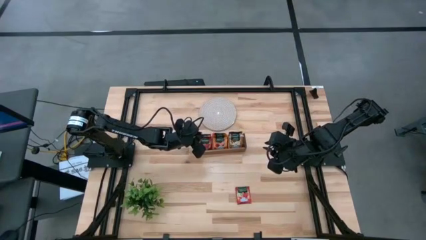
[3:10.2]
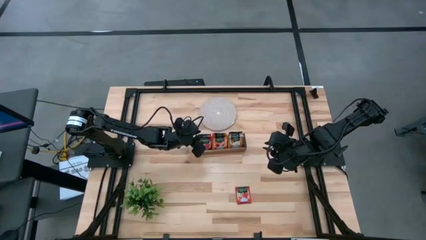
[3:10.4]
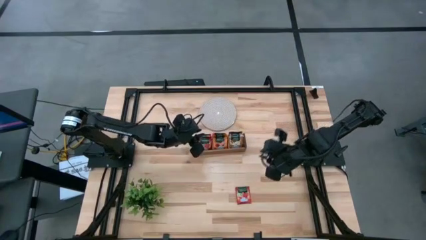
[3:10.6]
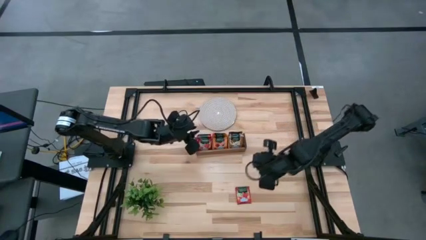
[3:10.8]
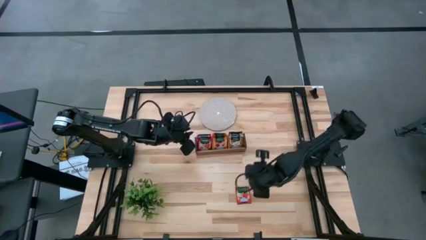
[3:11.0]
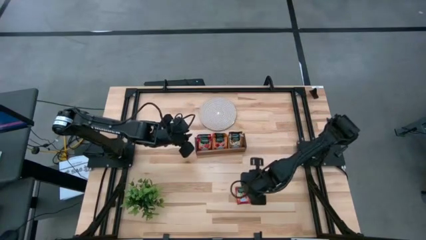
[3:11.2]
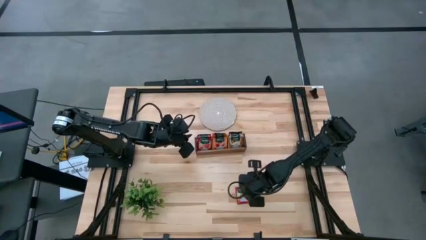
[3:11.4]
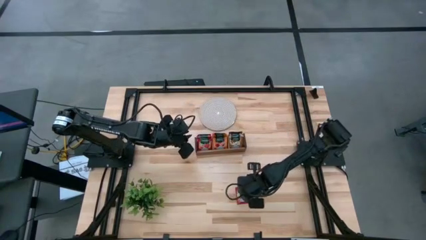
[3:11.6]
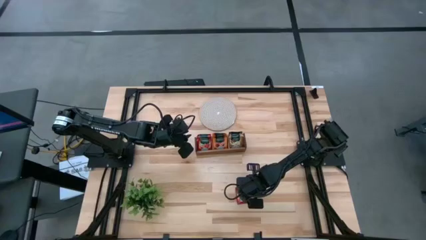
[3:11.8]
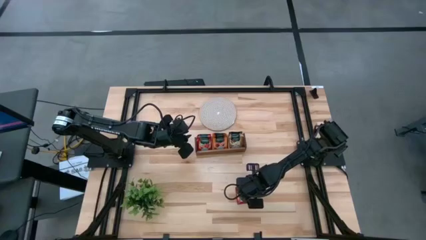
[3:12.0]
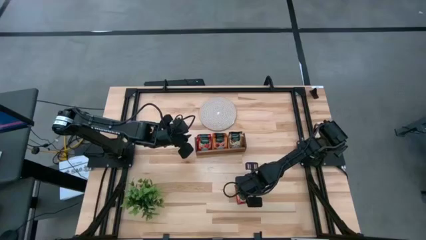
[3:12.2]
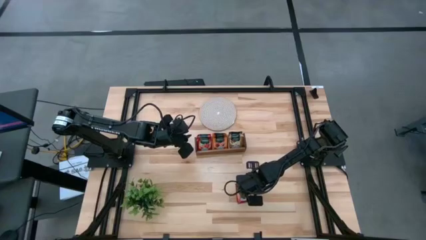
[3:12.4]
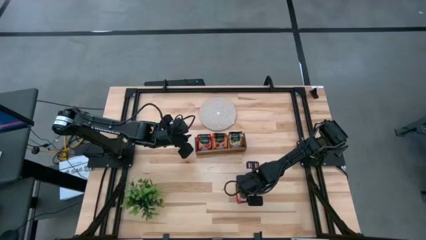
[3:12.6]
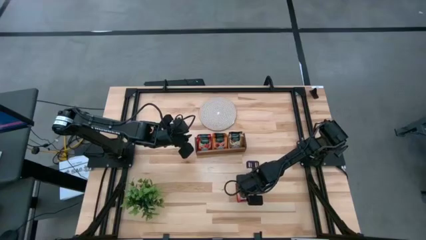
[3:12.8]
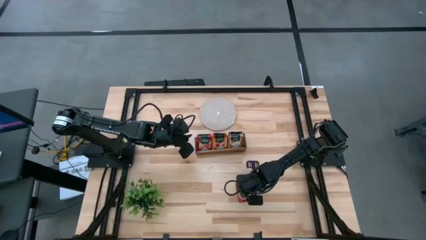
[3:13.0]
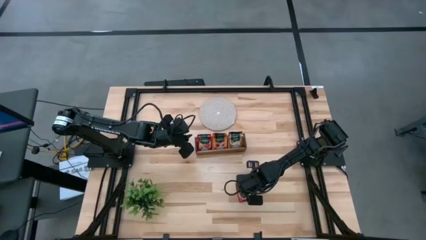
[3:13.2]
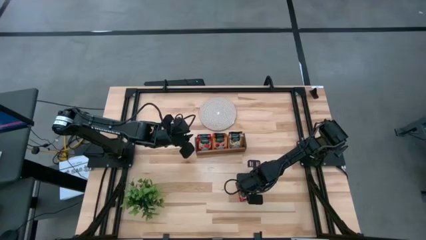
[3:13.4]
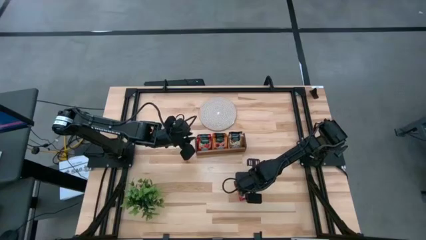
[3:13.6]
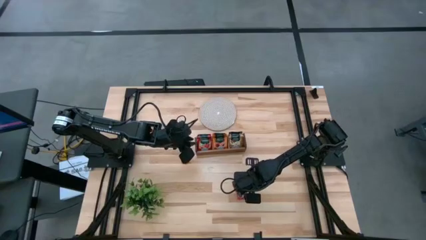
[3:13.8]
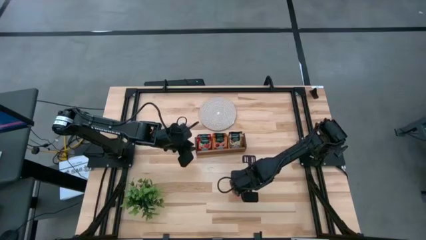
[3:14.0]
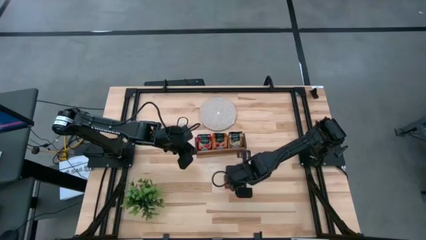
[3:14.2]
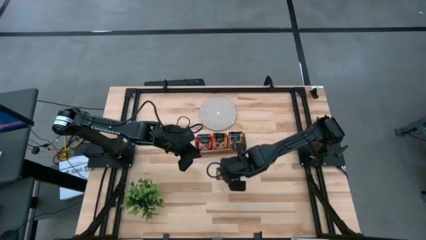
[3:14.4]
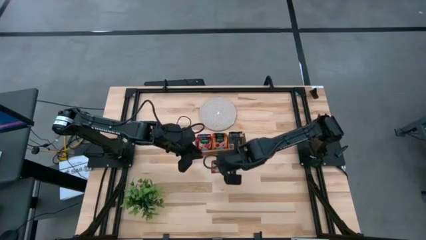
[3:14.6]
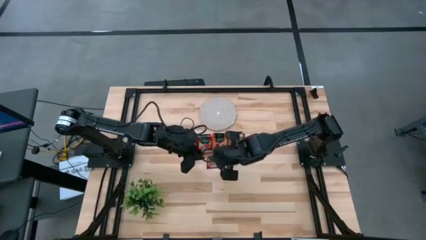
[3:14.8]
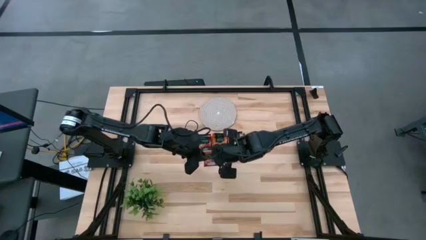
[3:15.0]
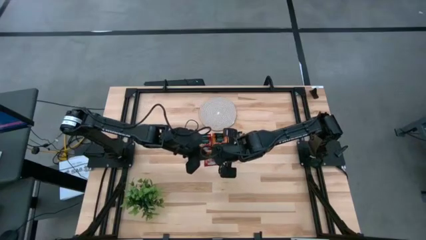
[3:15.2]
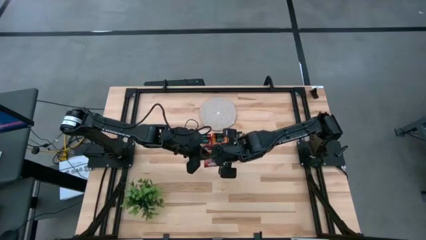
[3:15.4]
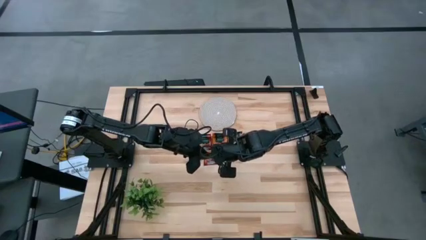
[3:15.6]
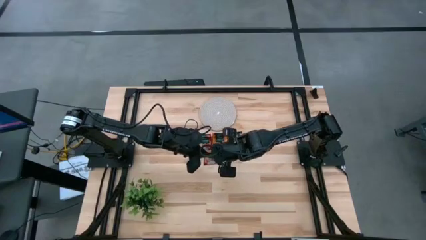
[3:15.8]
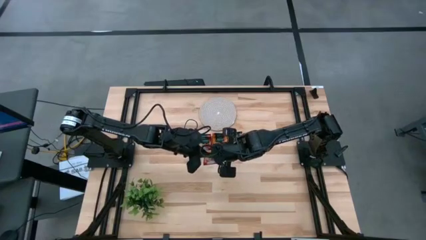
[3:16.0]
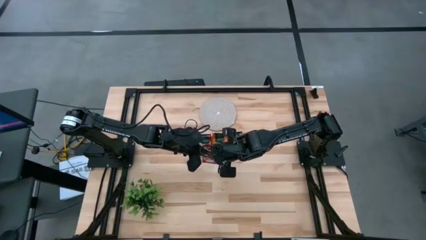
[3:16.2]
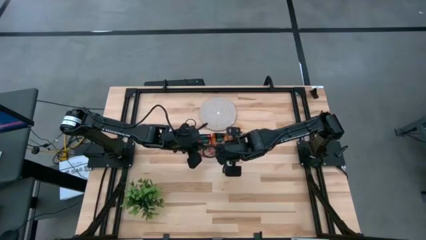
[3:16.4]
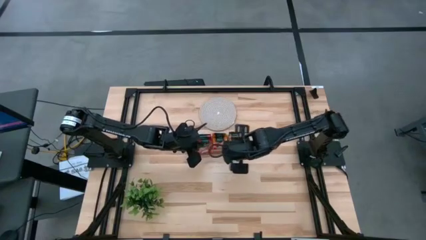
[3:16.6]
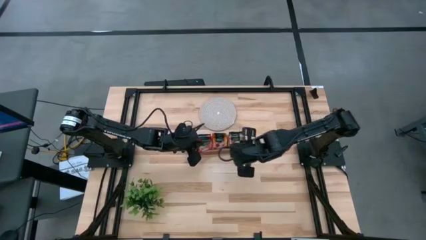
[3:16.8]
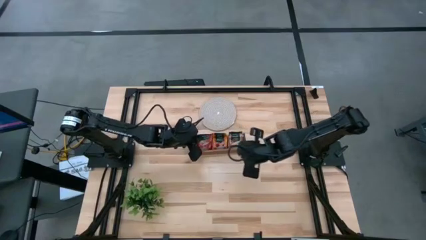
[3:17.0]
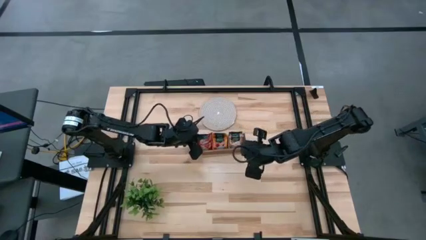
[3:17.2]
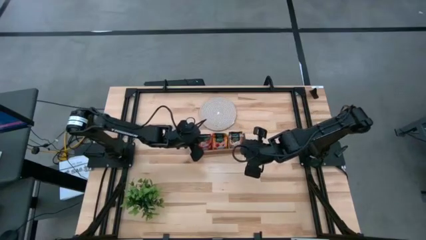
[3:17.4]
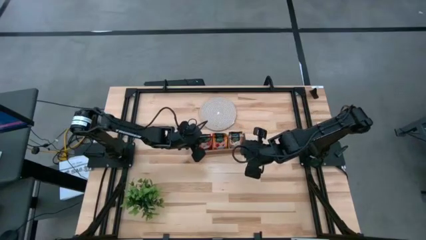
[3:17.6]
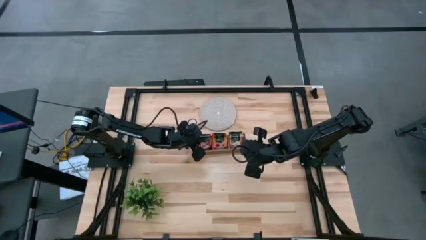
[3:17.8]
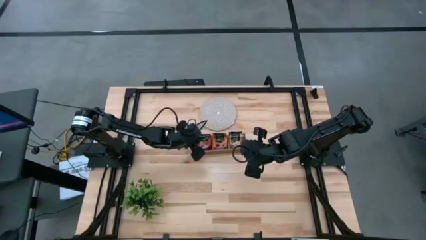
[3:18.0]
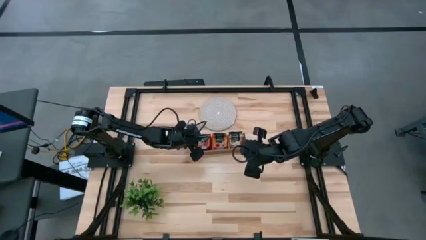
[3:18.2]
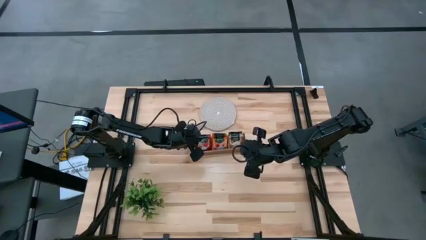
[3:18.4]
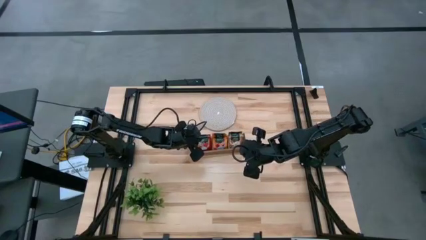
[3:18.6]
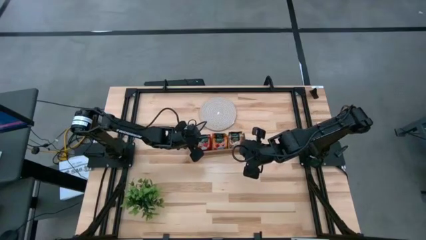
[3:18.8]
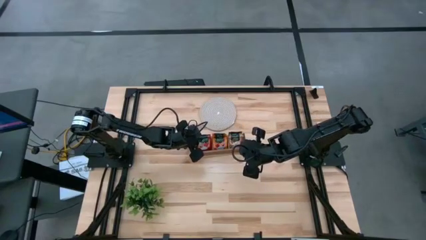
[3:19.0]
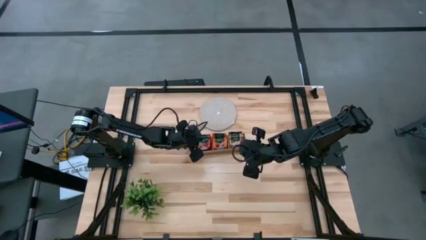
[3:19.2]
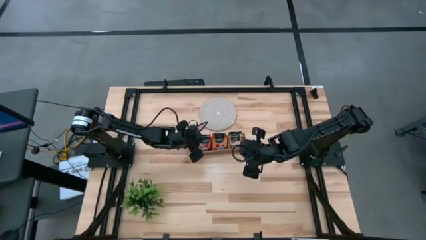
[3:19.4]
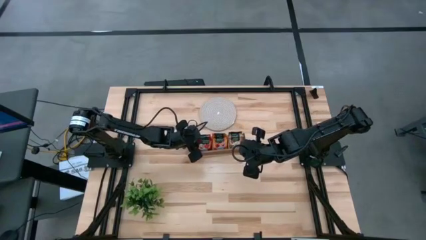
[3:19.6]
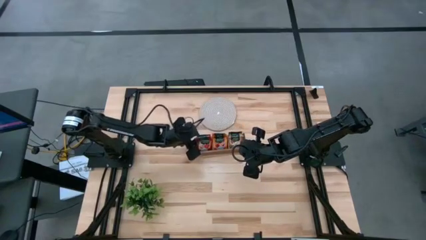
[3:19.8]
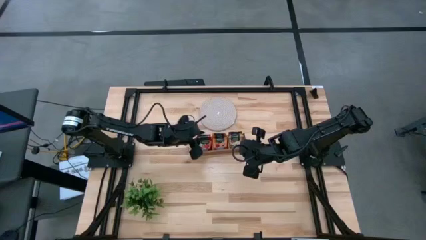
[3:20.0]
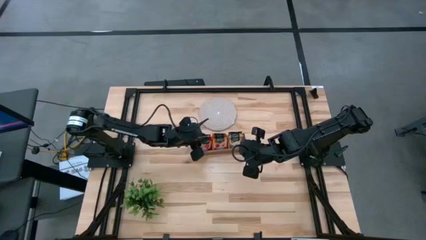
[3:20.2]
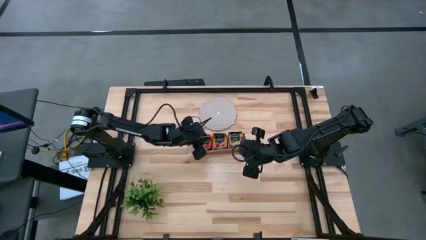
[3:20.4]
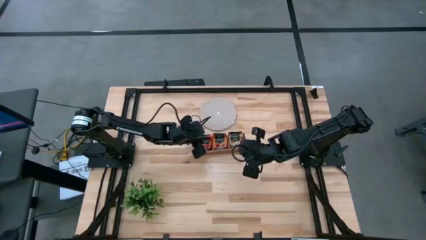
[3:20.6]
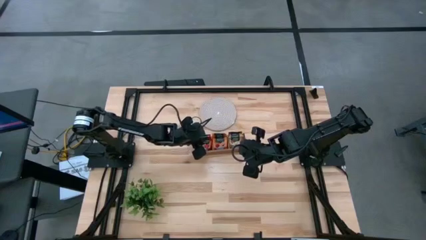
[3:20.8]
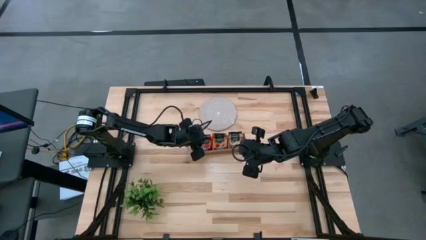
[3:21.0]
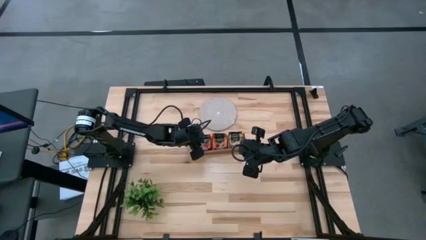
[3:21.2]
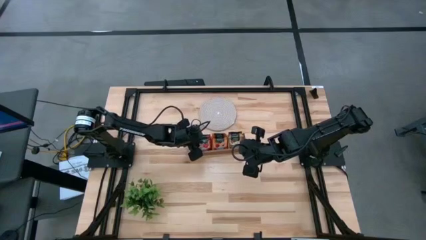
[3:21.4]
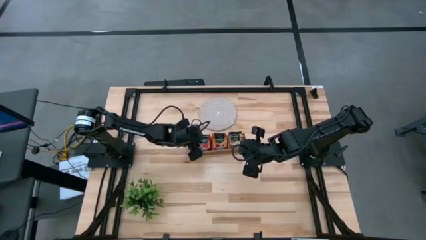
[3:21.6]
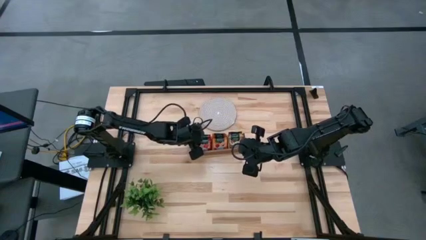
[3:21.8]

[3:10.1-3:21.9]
Task: Pick & Place Tea
Put the red tea bag into the left section of the wooden organizer

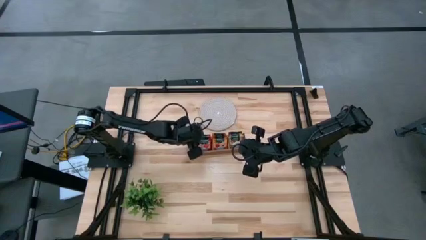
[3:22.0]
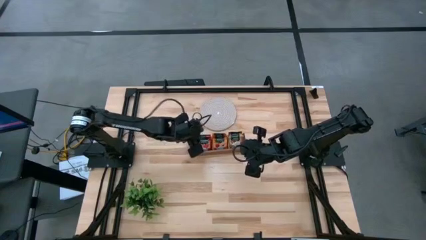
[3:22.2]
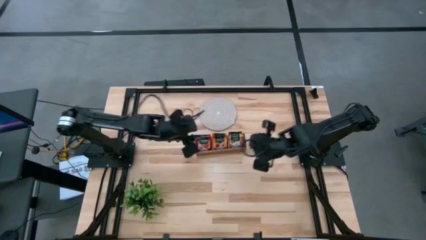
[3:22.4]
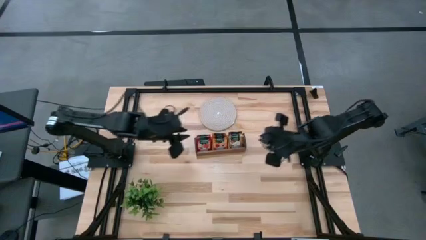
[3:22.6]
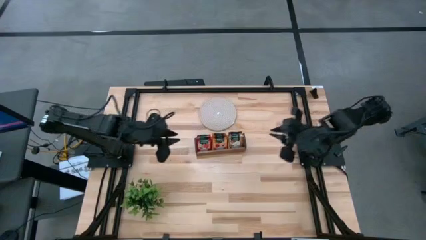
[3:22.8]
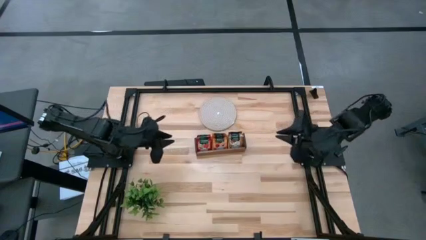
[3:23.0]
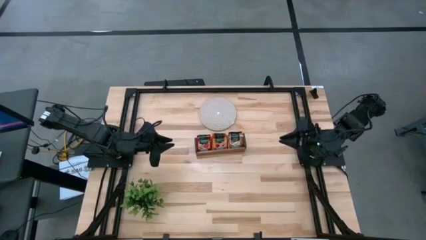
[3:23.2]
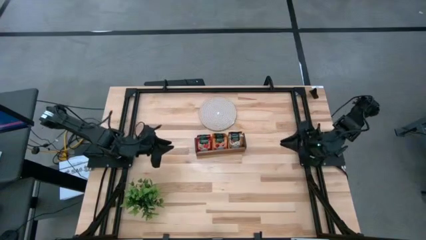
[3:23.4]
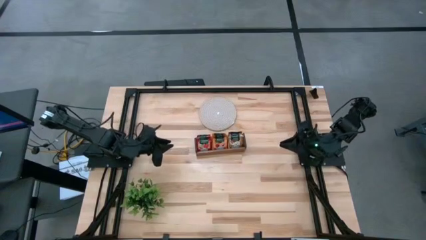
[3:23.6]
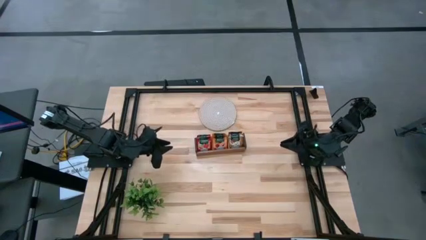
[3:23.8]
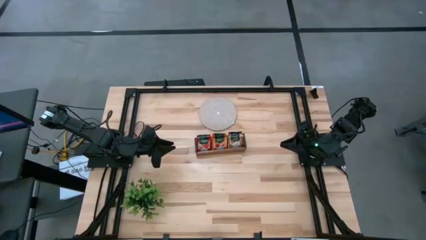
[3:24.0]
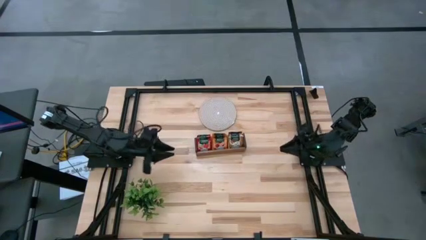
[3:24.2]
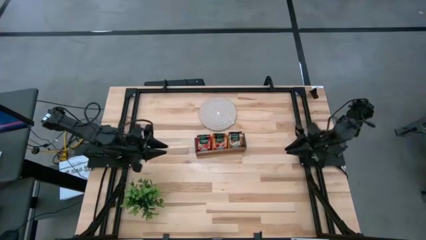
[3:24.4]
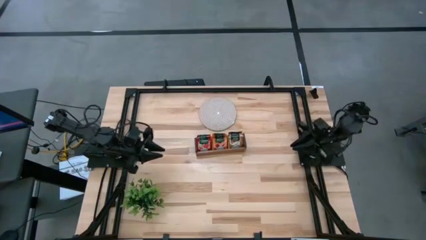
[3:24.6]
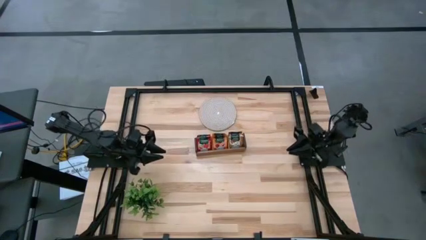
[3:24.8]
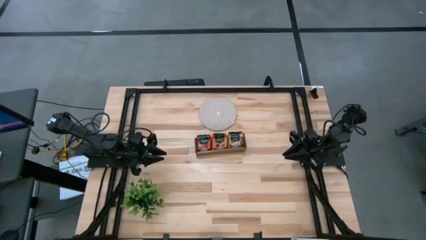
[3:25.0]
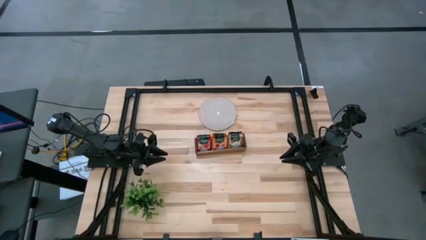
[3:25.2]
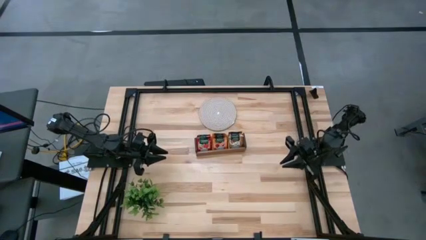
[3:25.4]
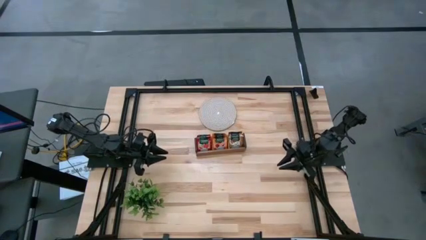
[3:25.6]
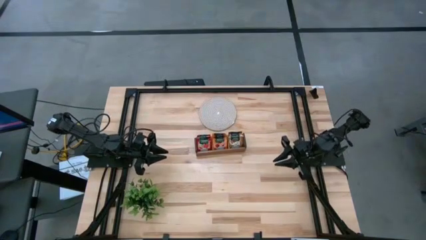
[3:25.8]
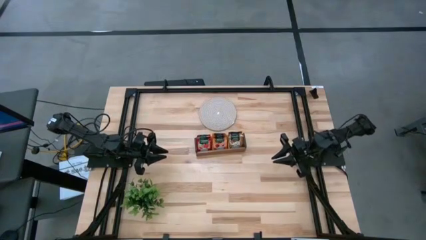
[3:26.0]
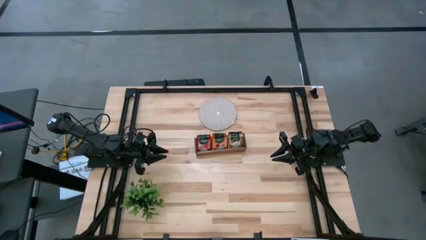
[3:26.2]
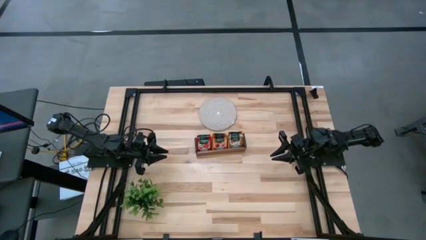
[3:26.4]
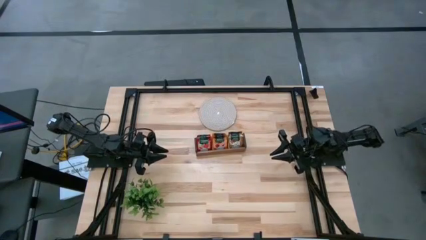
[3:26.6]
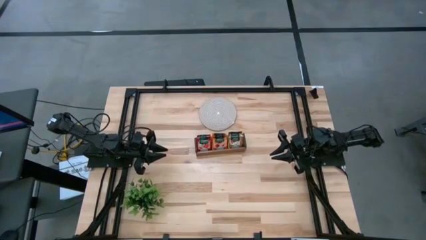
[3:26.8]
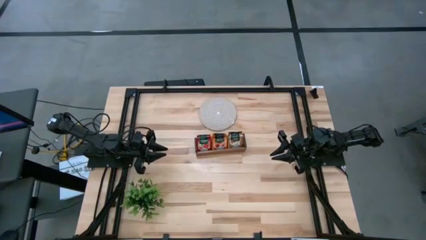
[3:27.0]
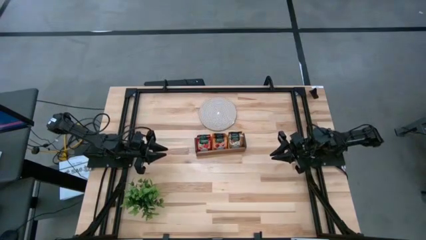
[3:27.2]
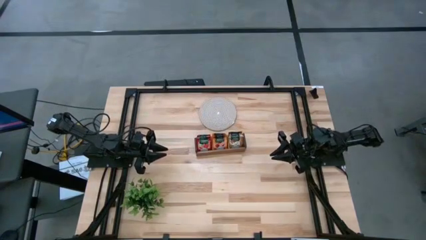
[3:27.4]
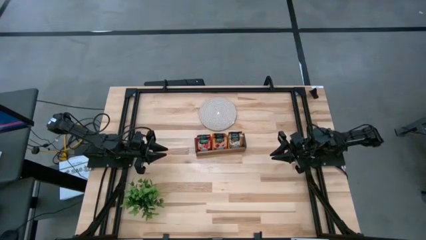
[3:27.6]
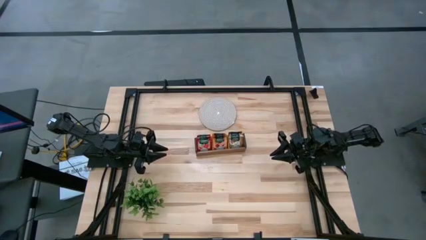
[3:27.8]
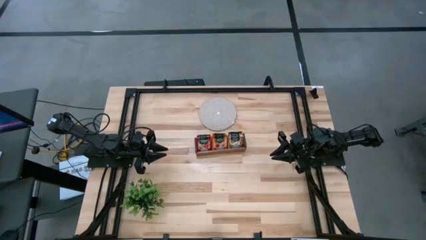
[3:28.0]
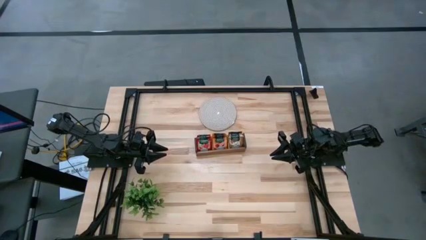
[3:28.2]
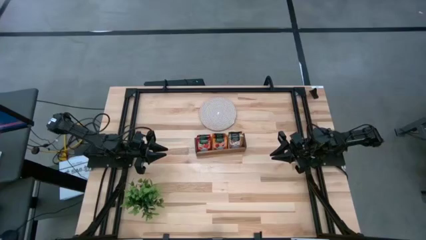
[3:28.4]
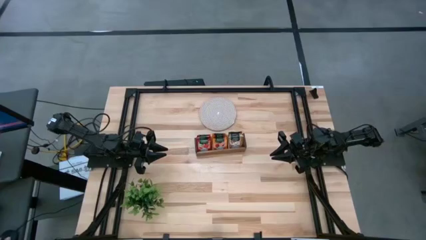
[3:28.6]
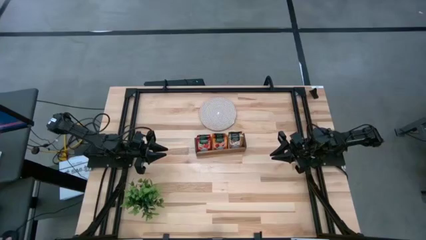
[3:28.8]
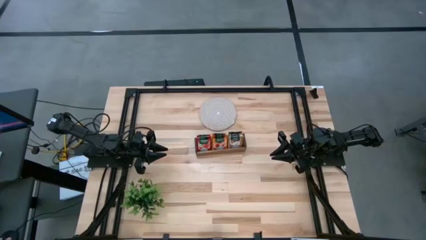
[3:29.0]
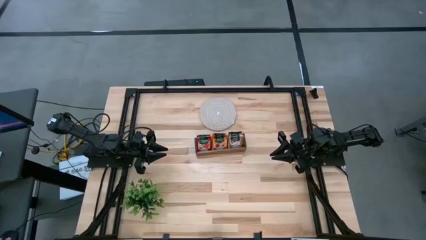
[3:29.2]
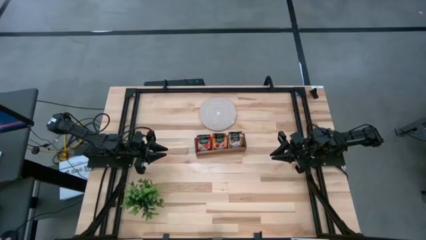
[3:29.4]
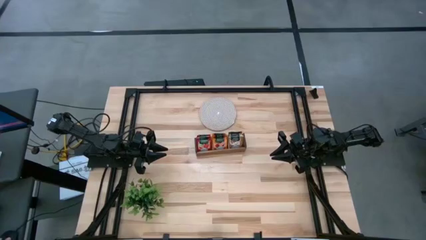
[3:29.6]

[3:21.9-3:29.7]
Return to Home Position
